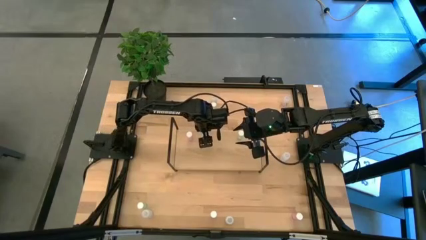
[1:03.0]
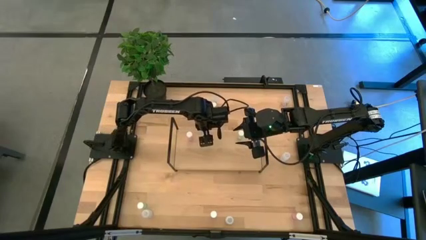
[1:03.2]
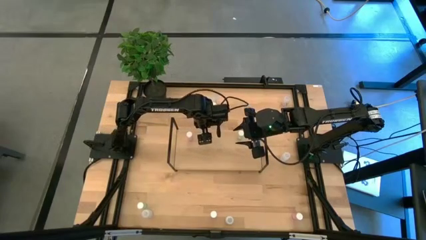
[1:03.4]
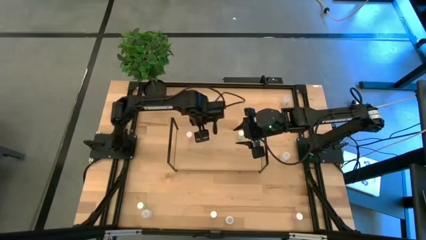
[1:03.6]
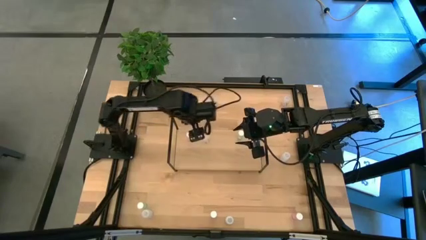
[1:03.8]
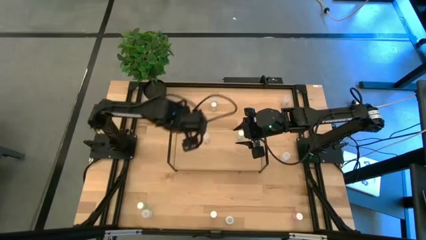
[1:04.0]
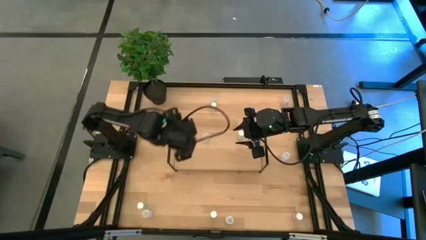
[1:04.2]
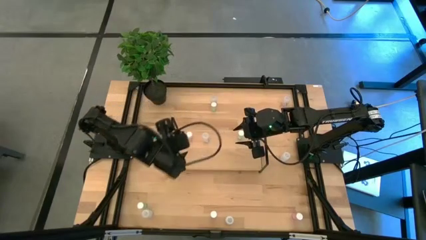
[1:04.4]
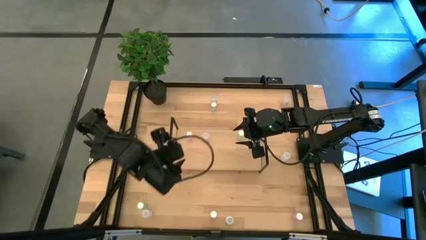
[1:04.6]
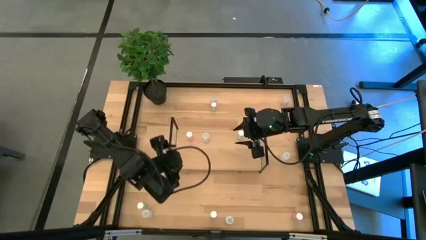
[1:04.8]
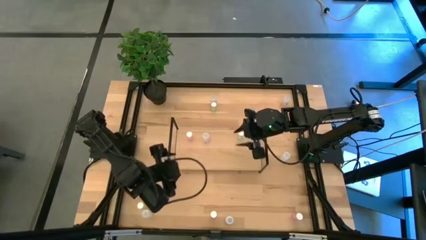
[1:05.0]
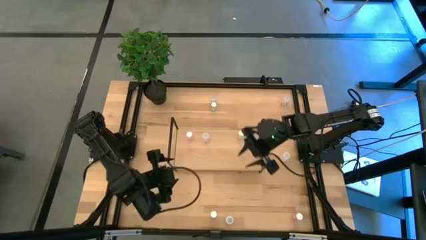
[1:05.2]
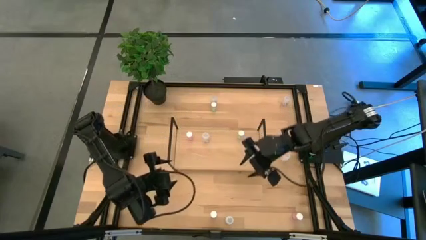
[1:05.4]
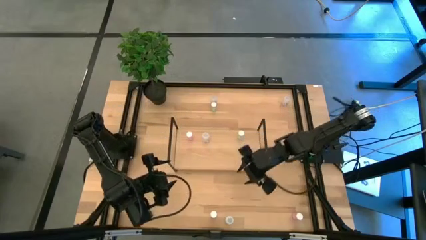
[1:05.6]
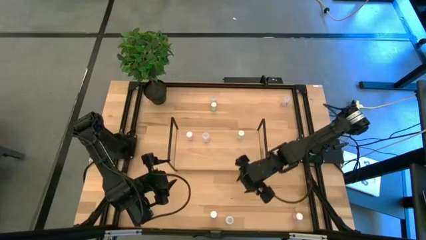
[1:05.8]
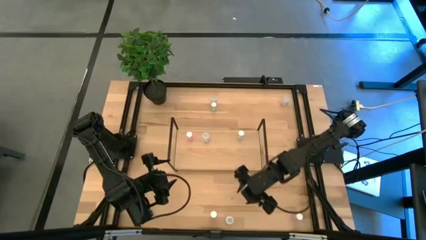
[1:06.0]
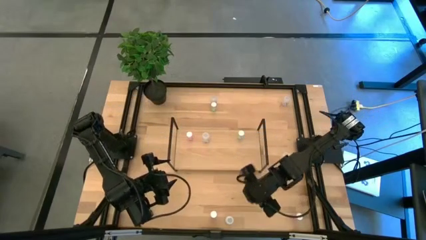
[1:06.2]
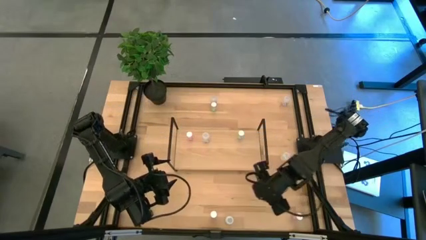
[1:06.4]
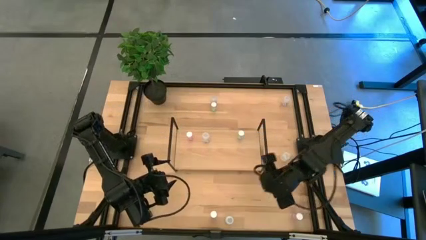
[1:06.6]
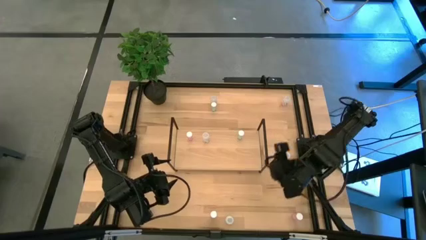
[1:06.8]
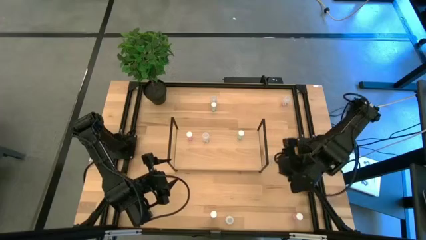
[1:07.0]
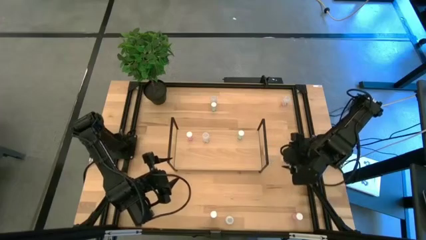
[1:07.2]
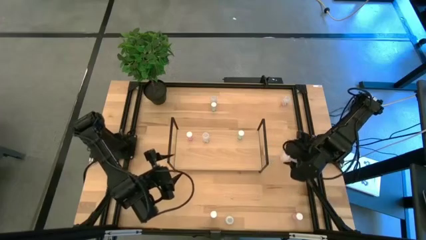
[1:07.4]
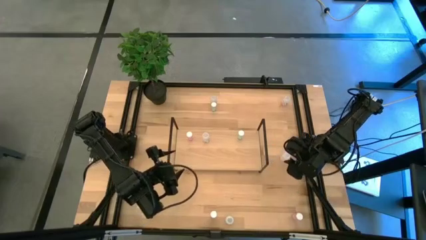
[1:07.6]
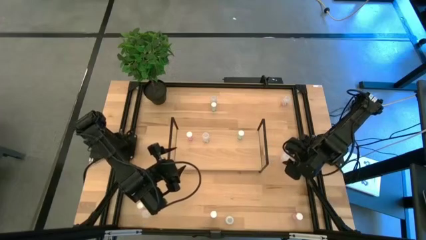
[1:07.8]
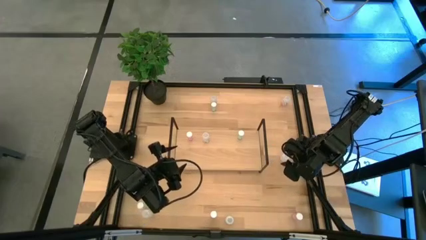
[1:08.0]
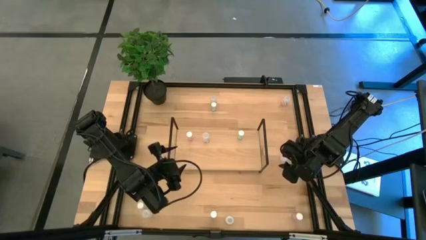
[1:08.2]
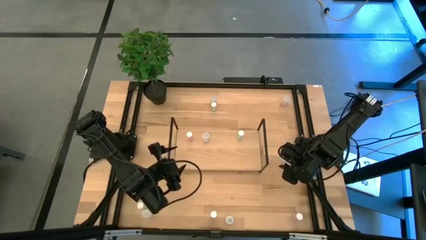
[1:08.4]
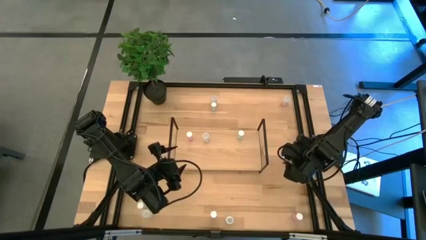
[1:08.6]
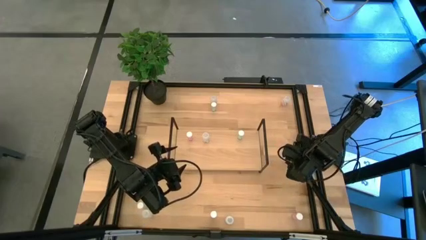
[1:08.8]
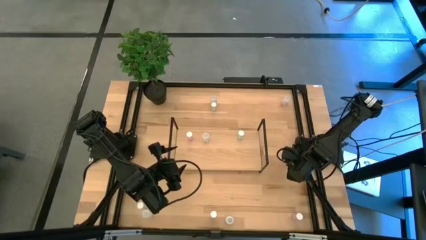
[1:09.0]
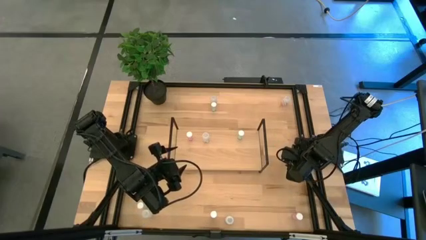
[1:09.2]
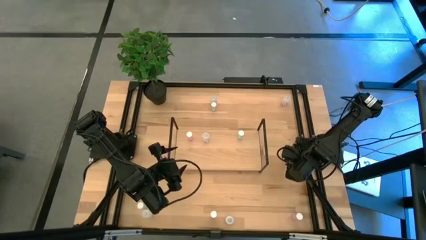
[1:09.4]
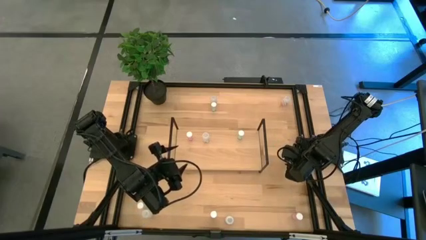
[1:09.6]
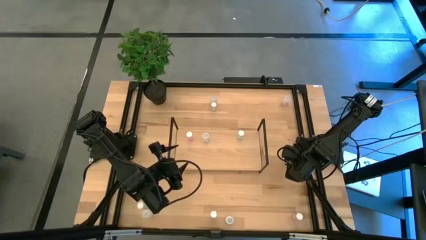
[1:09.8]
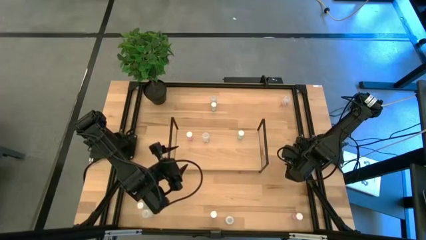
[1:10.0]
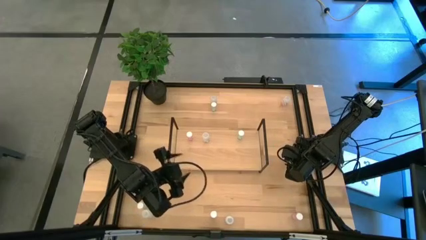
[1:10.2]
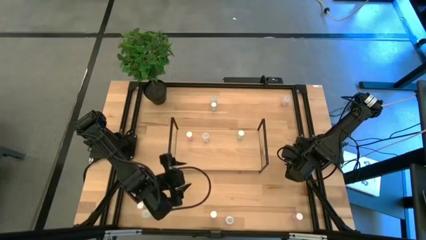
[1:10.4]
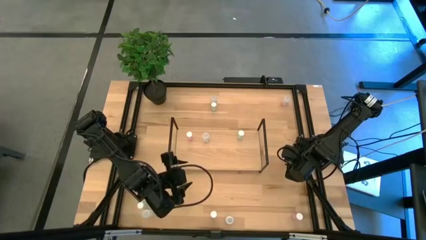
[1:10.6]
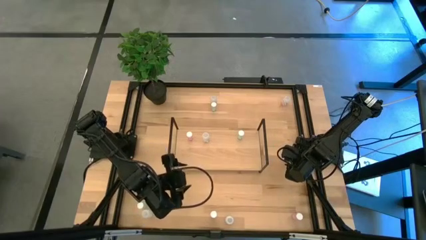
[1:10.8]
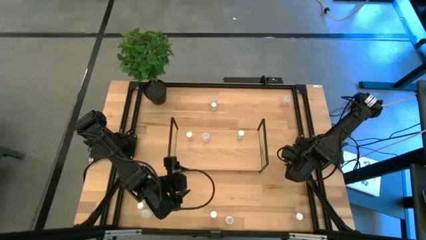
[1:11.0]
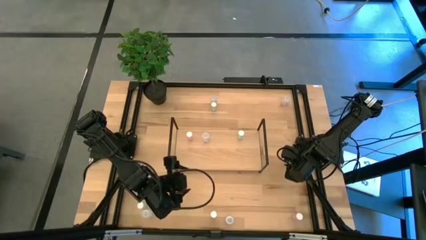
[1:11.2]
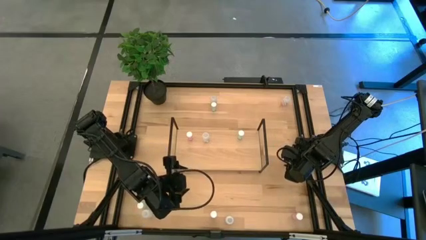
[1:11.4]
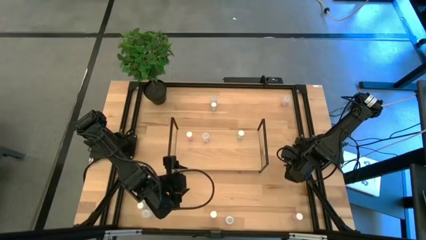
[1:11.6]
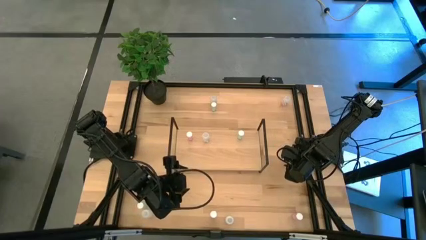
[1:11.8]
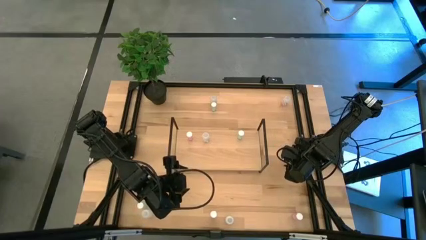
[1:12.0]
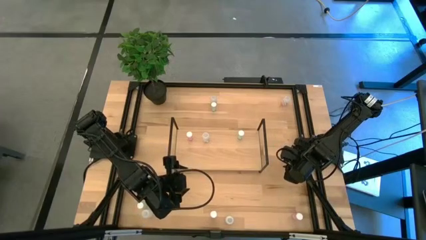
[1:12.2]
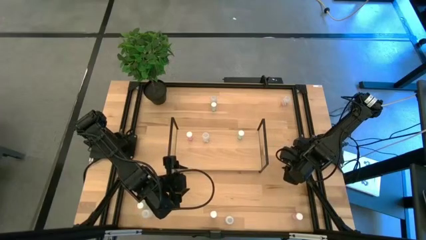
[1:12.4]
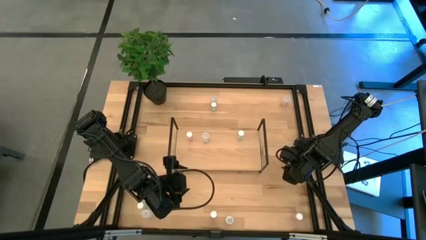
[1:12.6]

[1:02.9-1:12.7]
Task: Pick and place medicine bottles onto shelf by color
Put the right white pill bottle on the shelf

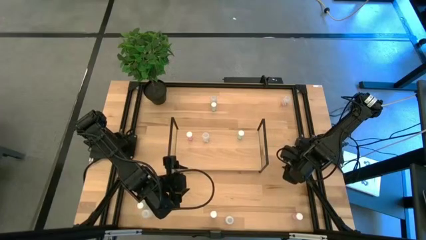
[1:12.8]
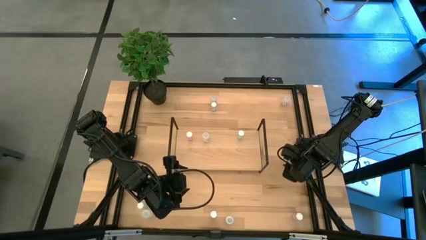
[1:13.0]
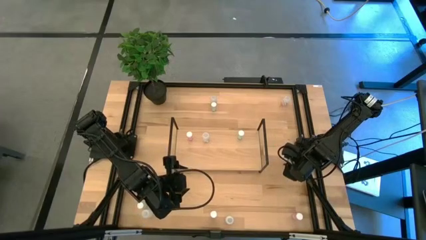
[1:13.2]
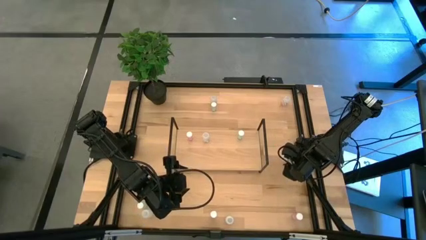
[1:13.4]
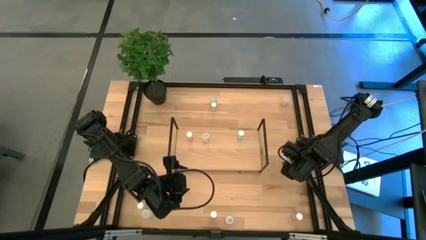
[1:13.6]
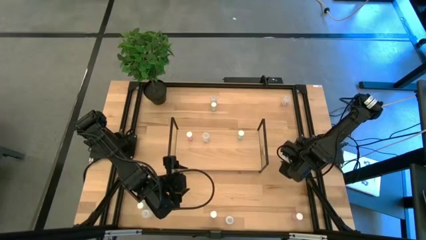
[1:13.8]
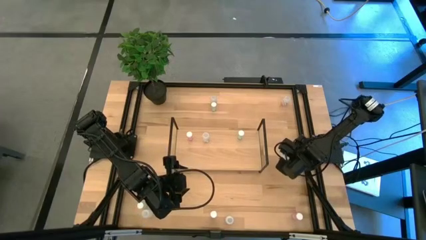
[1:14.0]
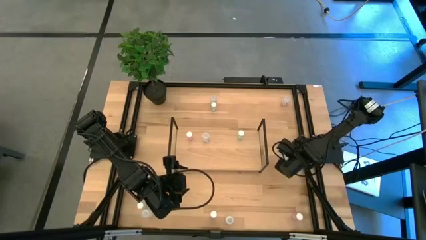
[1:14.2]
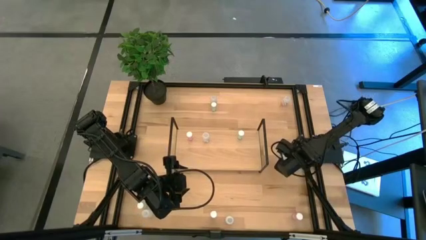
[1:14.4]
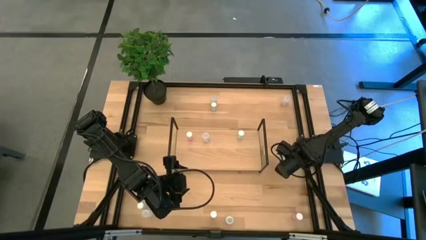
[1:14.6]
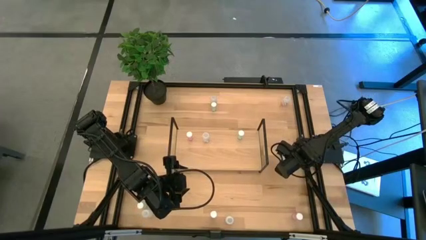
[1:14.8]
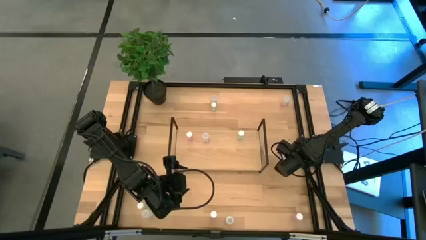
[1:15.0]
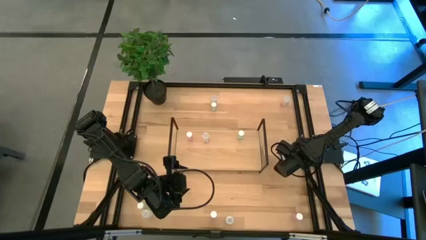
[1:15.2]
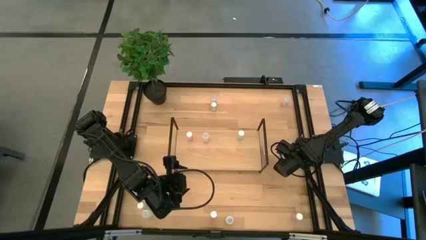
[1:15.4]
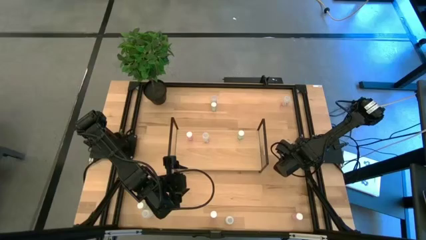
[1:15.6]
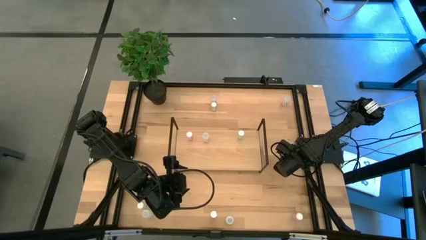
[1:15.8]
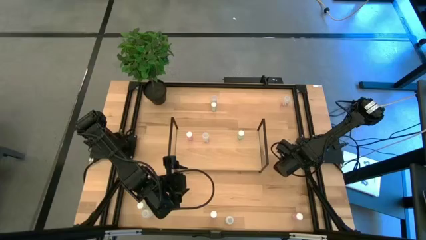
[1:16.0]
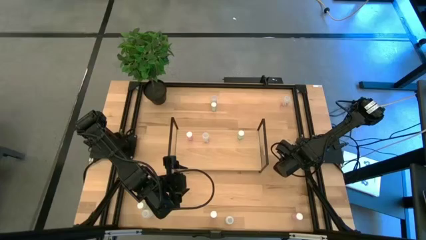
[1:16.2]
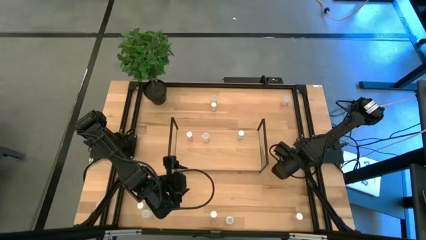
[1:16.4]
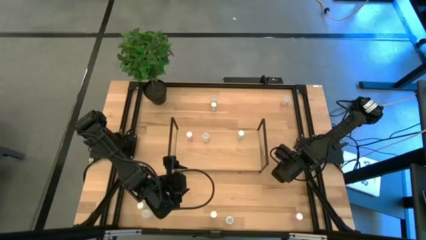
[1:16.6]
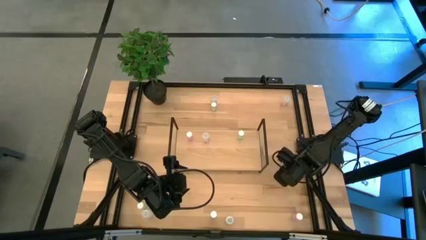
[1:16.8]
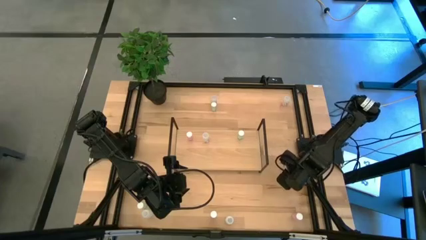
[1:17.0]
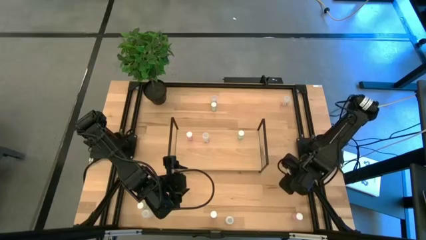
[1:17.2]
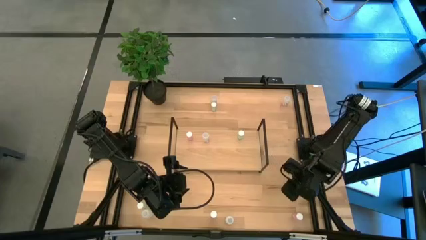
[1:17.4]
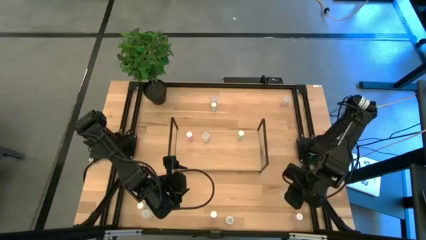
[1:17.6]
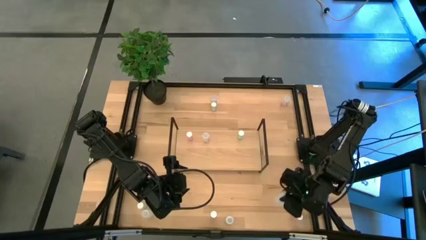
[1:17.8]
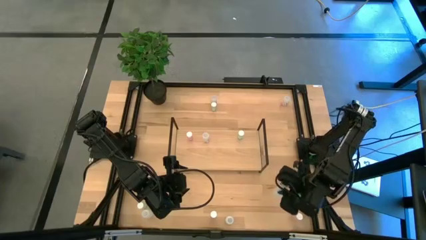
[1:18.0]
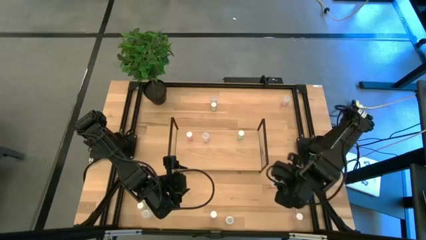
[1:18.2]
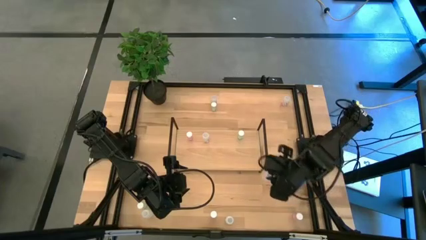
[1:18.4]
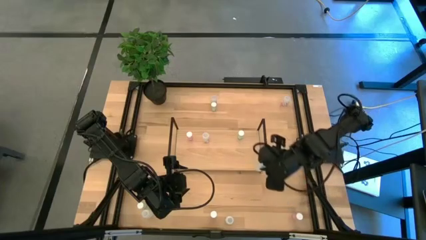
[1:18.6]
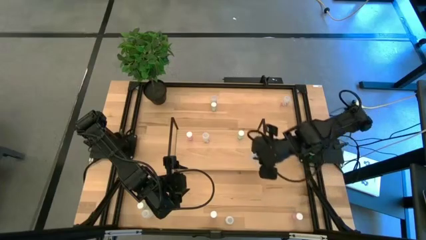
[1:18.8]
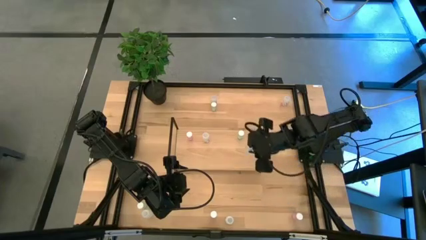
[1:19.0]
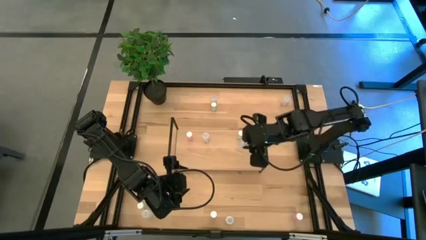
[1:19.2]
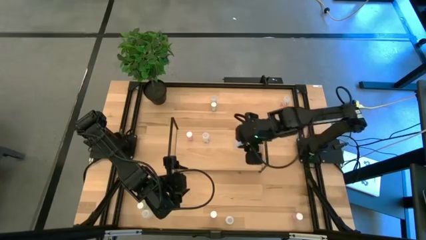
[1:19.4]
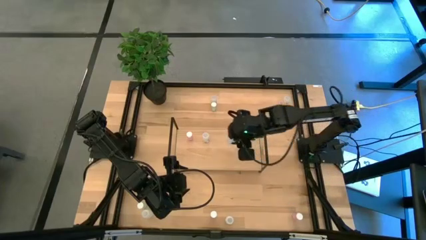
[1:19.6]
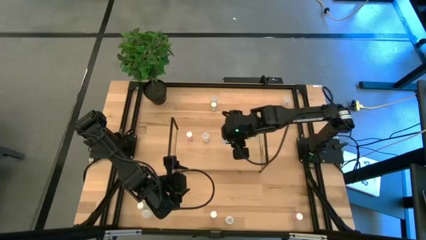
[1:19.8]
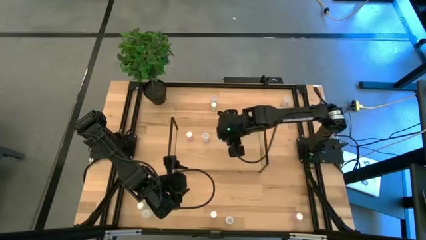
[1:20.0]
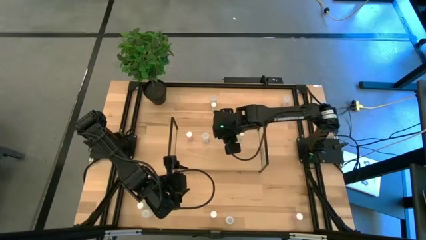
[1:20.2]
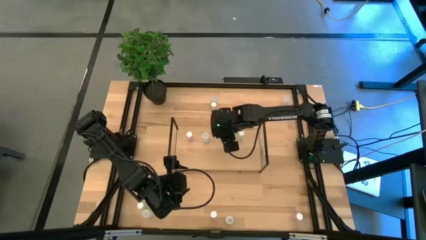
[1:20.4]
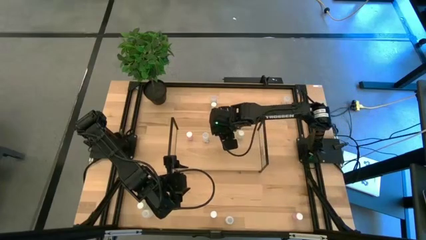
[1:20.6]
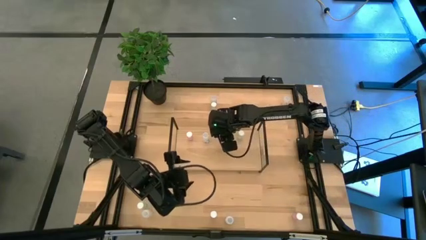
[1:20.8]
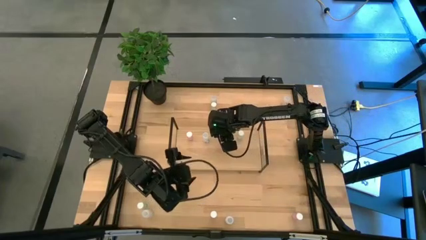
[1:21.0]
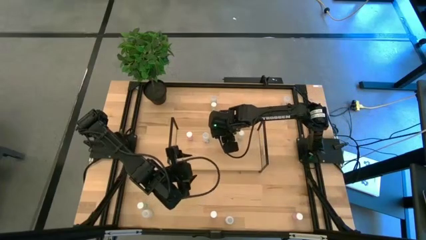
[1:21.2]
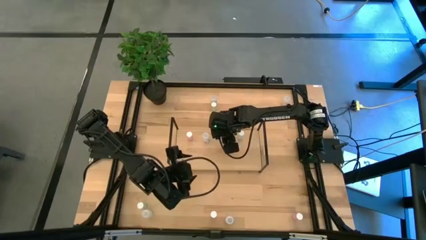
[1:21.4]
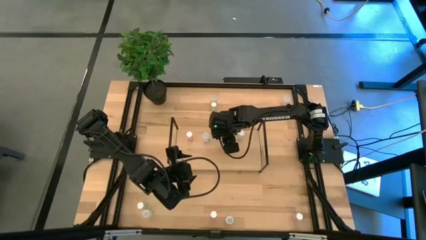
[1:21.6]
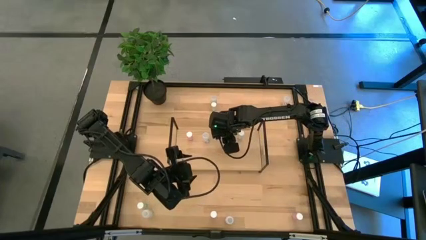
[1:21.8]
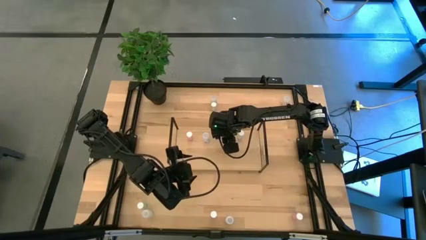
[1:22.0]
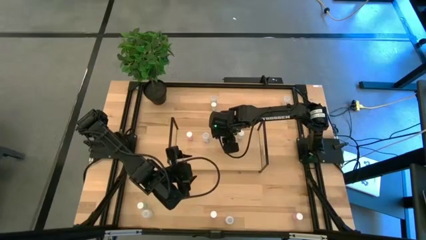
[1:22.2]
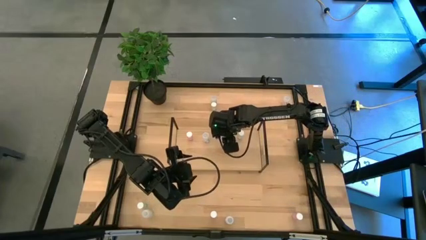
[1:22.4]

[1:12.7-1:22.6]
Put the right white pill bottle on the shelf
